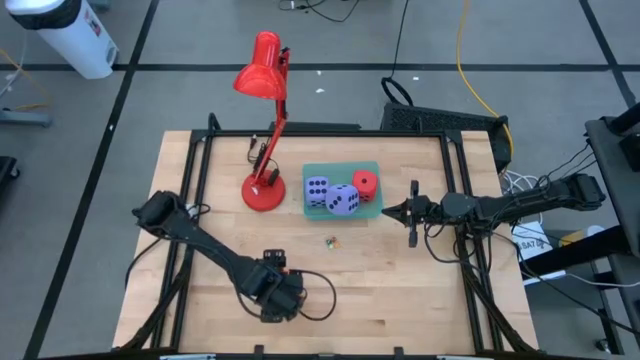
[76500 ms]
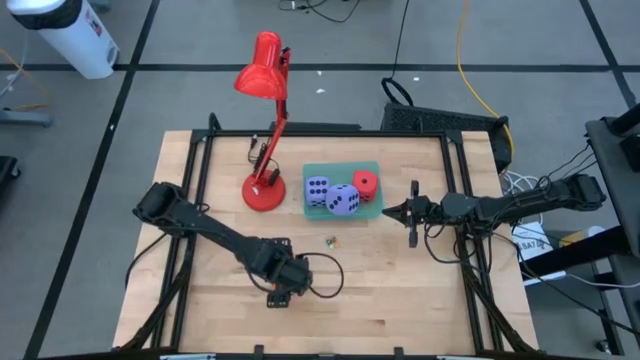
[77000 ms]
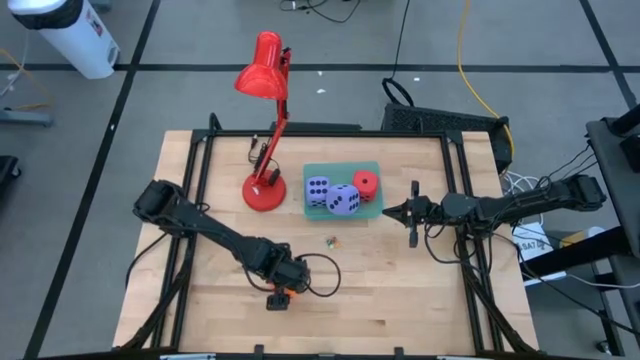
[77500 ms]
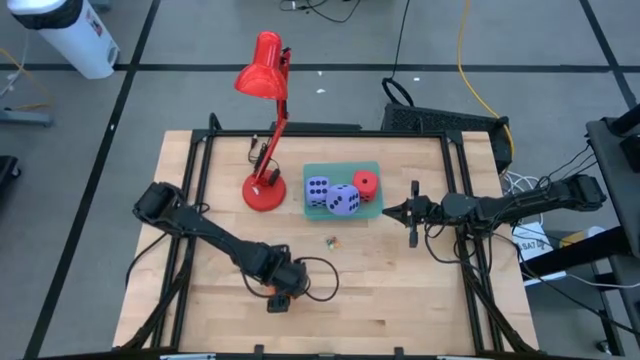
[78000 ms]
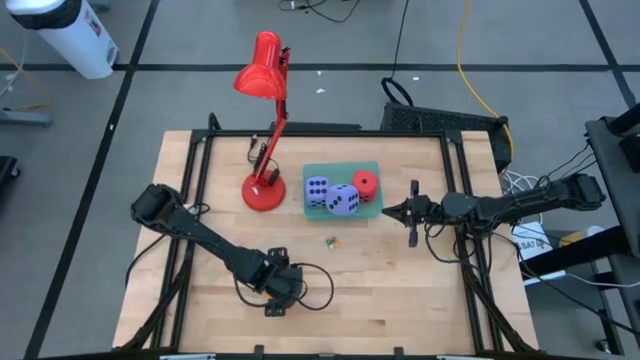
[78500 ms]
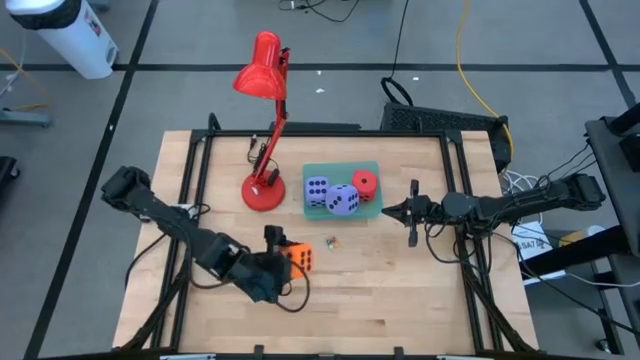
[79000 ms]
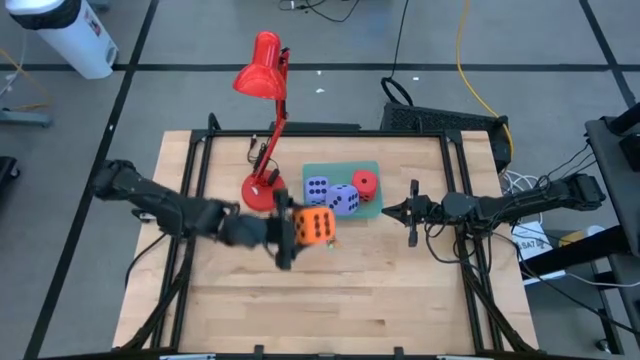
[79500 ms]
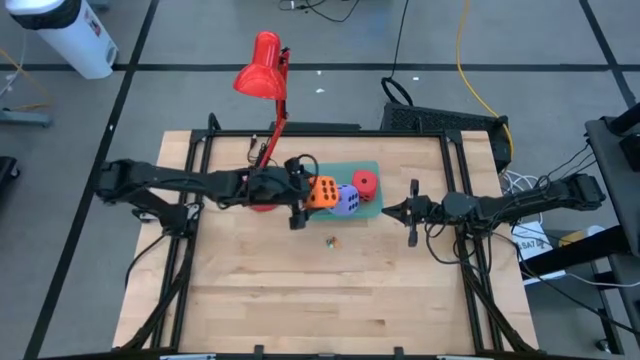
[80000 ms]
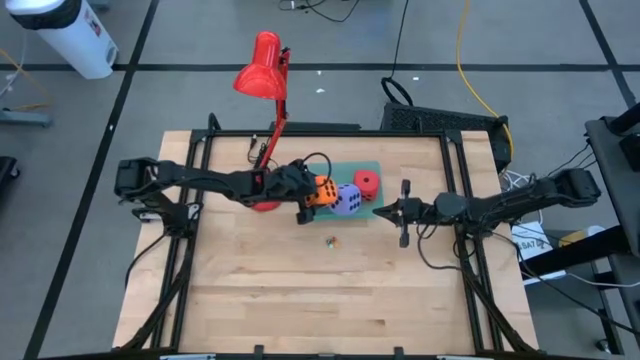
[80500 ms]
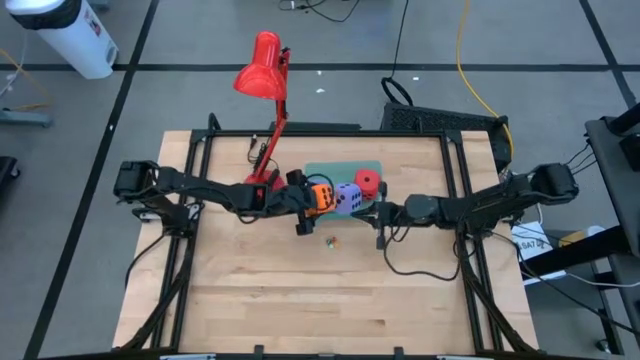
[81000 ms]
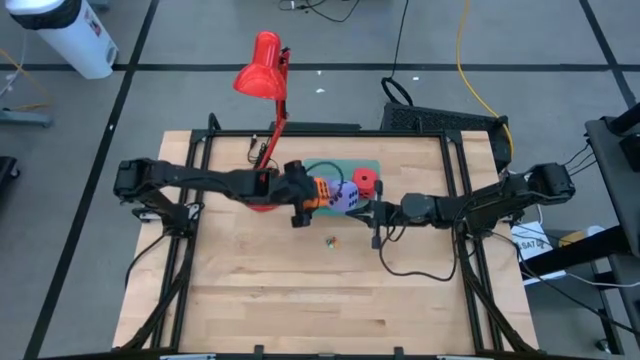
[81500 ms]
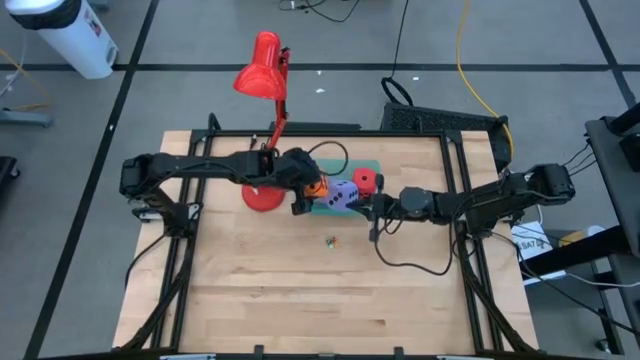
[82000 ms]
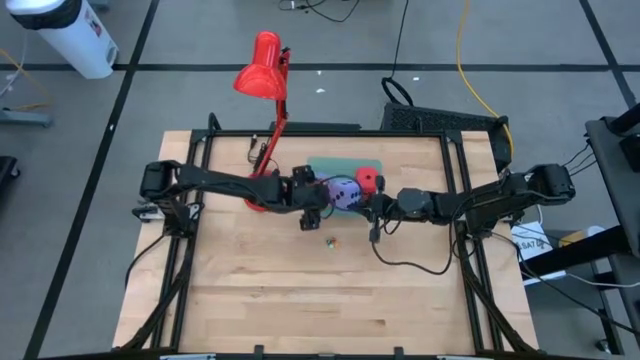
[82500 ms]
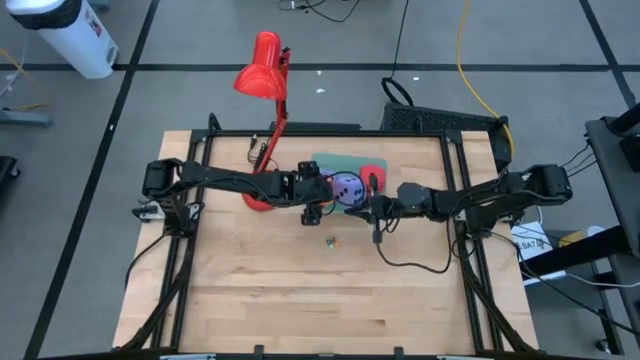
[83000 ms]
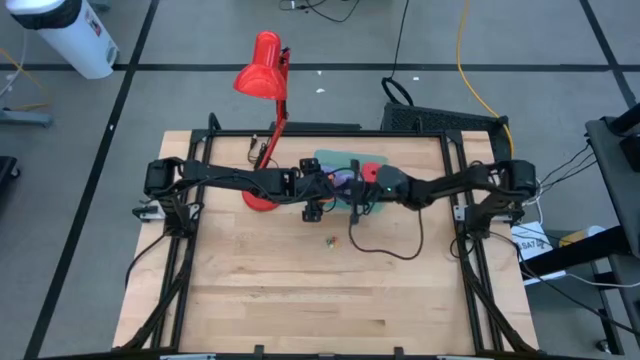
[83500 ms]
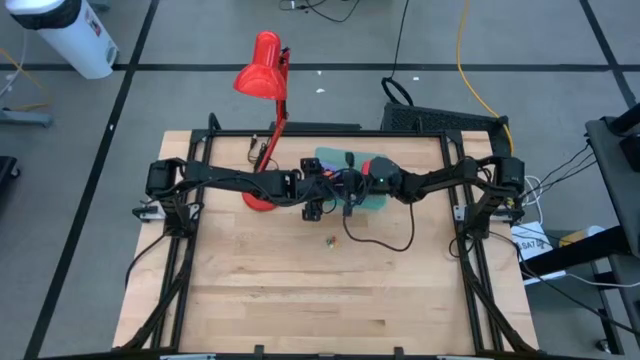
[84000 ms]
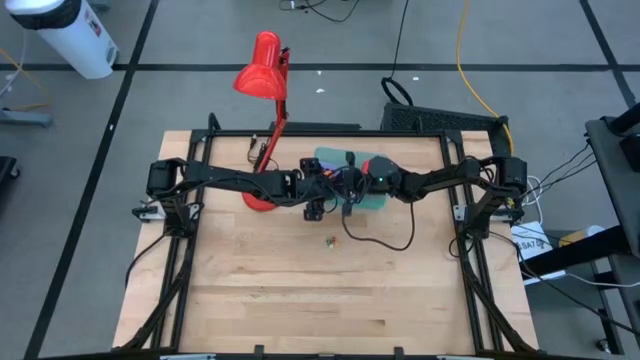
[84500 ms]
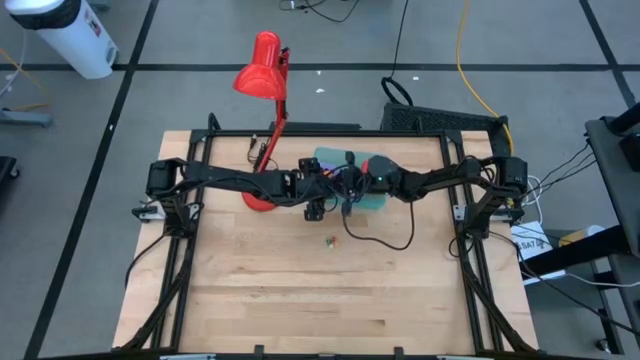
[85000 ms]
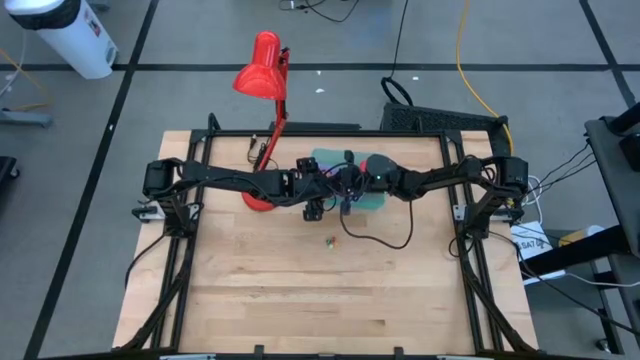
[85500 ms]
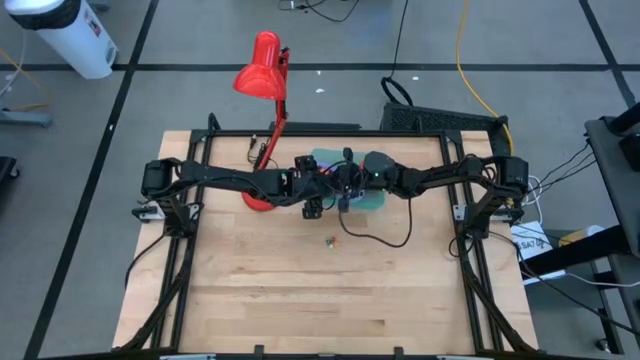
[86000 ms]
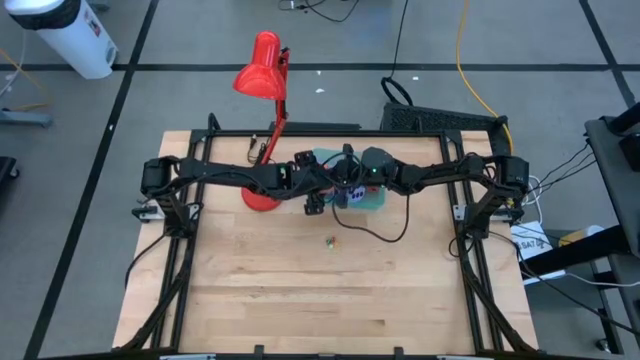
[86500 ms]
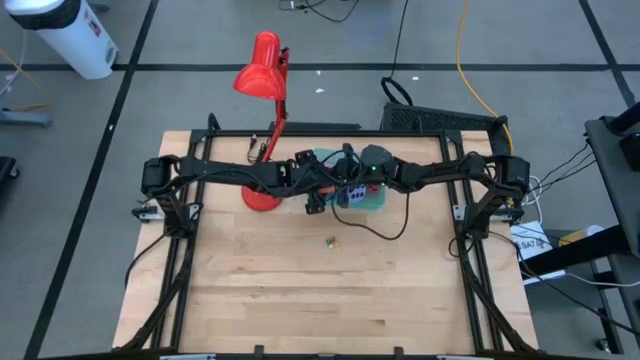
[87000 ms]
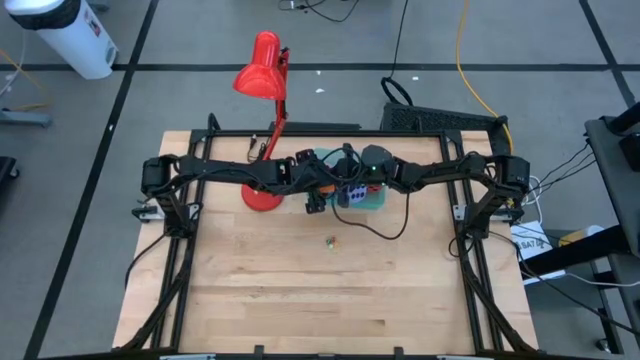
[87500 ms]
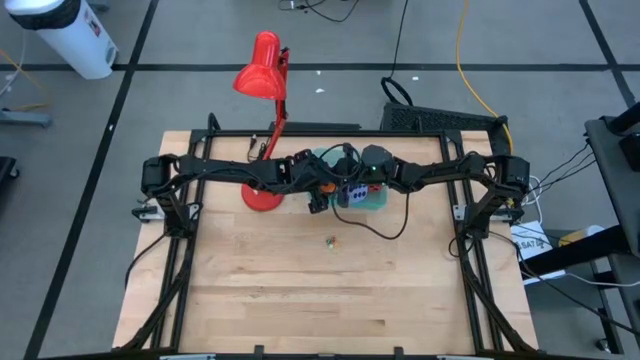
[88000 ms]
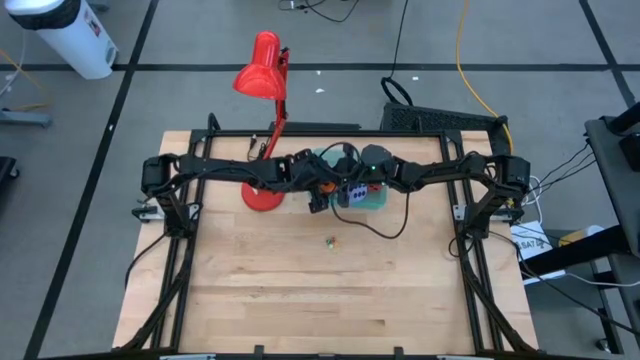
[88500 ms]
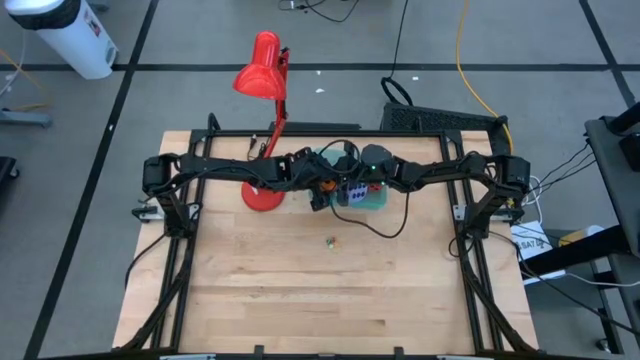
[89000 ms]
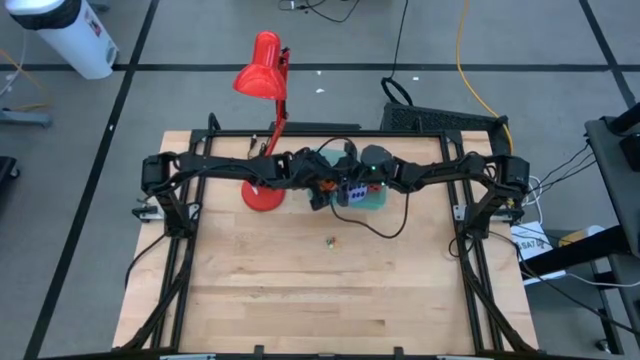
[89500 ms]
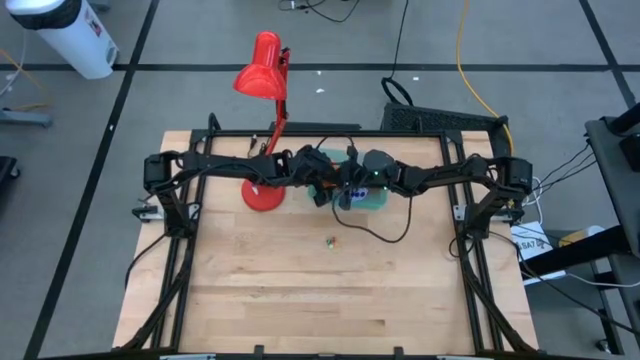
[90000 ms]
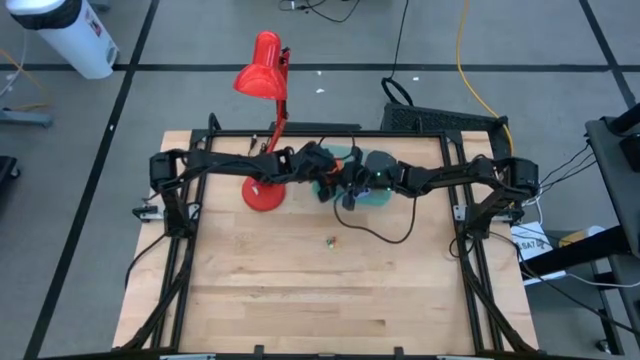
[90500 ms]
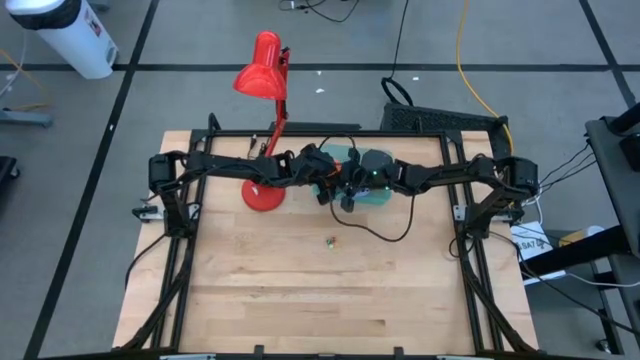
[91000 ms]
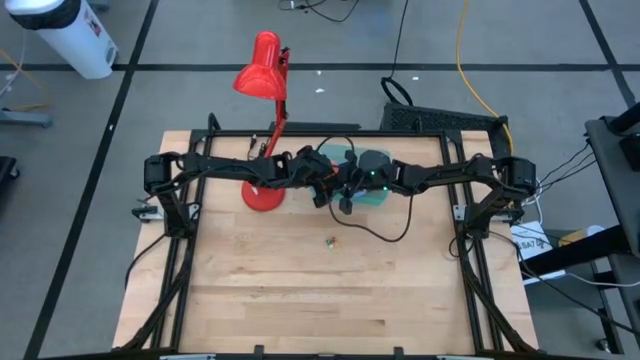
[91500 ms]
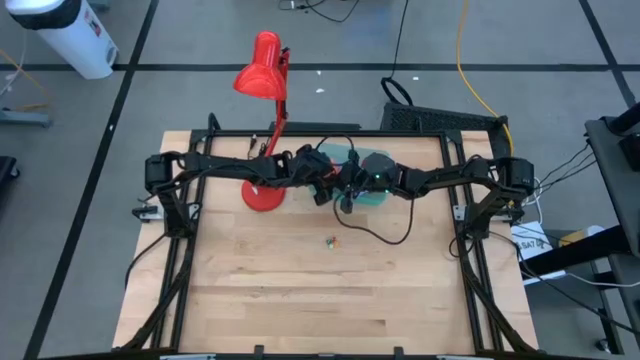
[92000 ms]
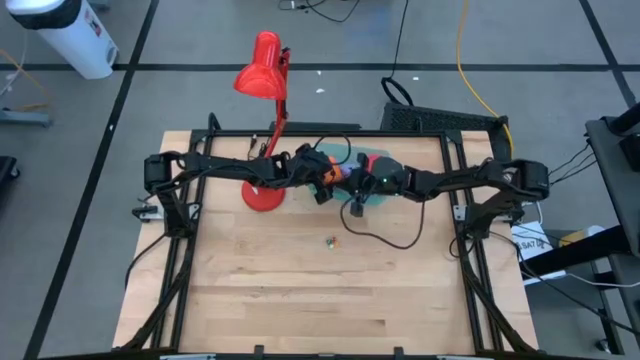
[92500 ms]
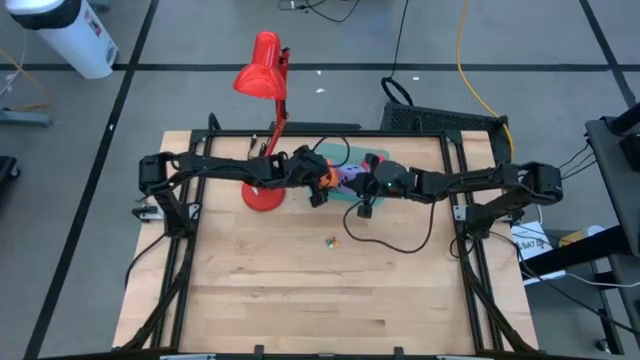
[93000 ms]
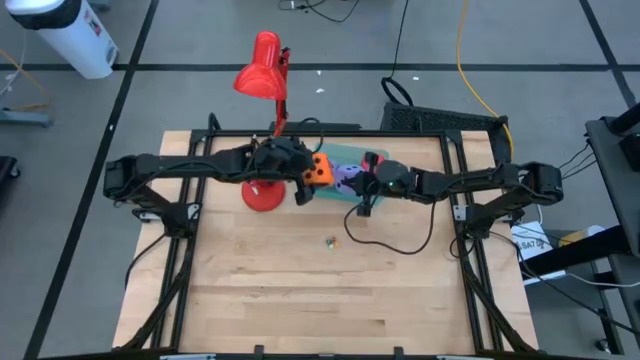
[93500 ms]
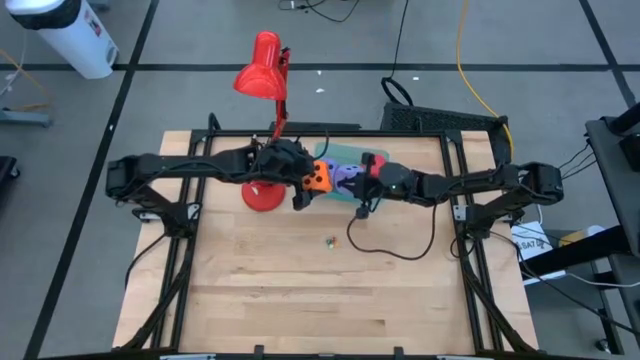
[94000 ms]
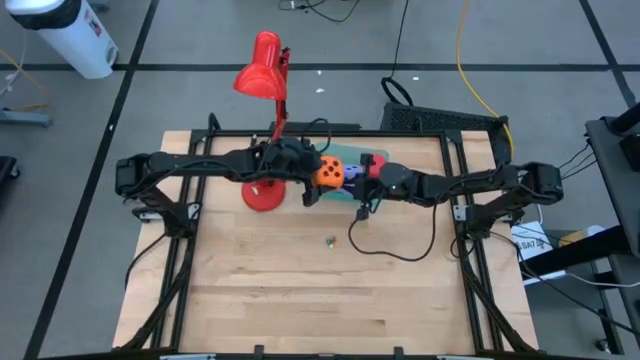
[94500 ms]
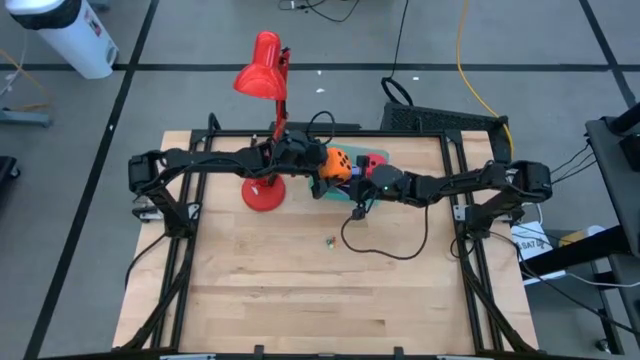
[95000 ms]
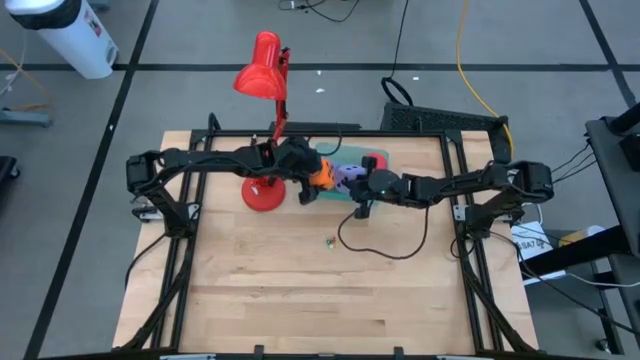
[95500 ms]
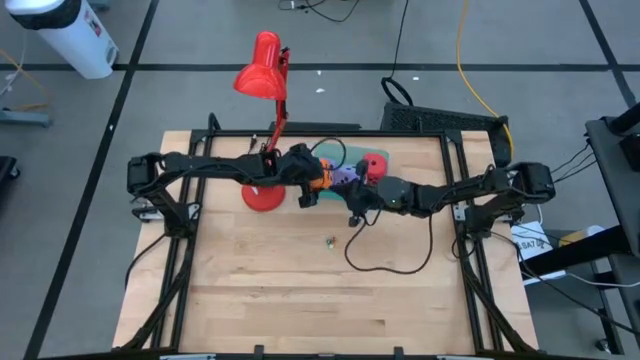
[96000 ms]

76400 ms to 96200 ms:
Task: Pick & Place Dice
Put the large orange die into the blue bin

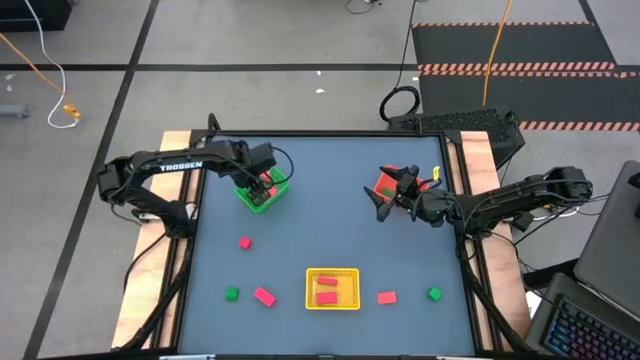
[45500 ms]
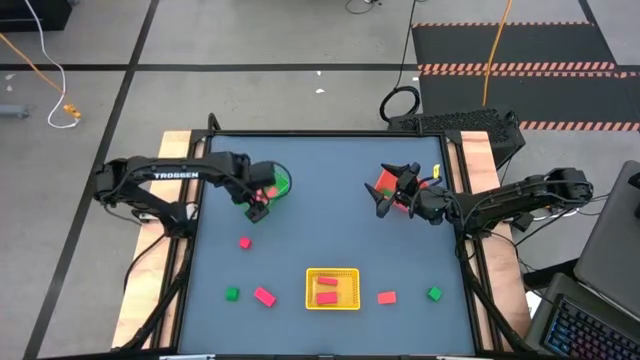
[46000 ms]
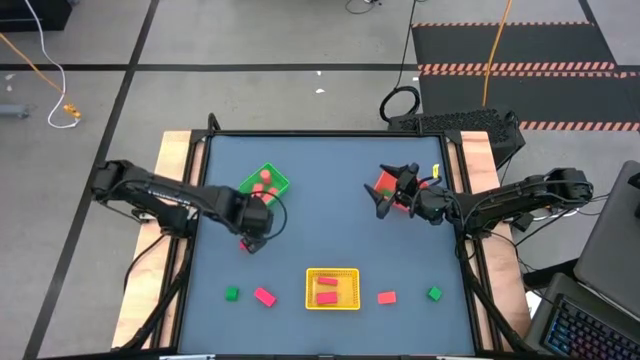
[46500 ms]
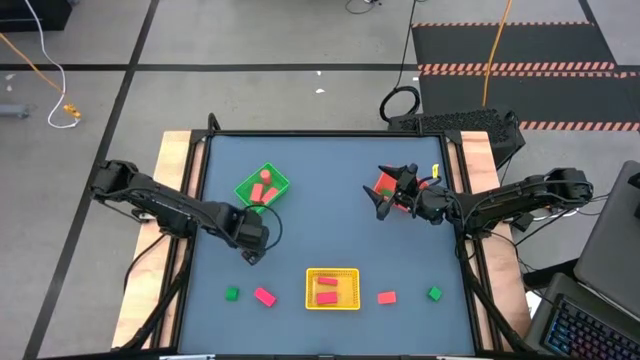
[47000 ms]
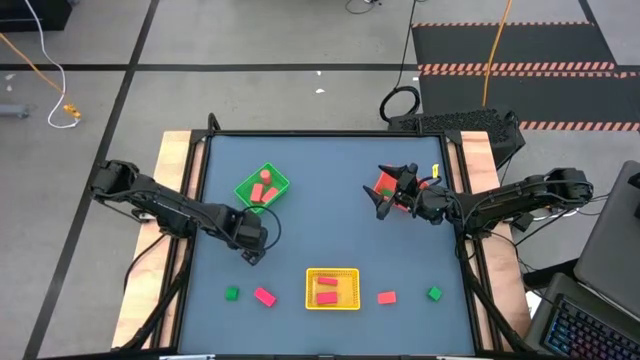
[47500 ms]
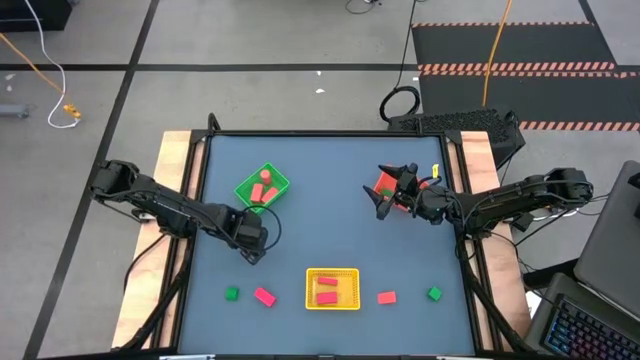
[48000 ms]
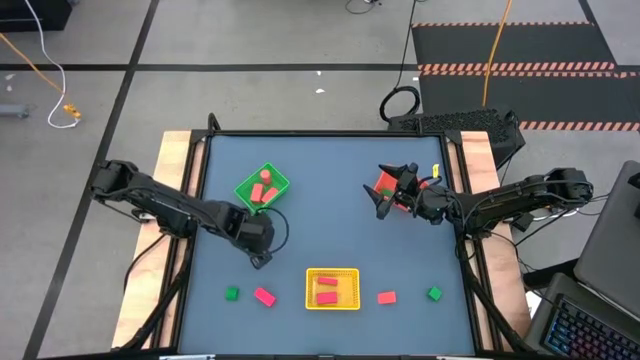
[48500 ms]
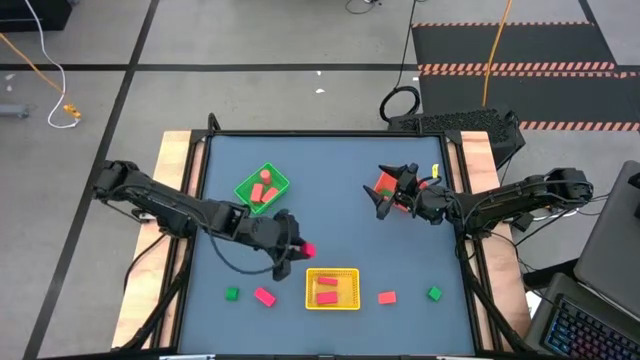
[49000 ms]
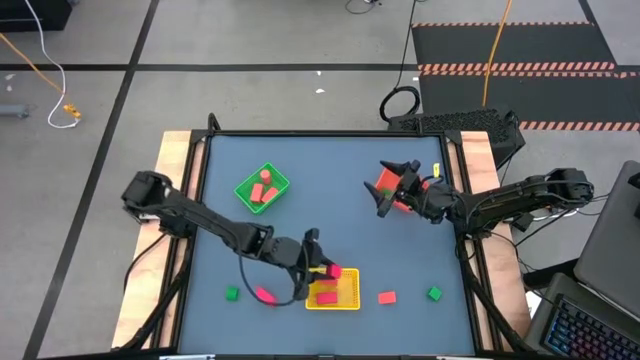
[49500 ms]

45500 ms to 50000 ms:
Task: Sort & place blocks by color
Put the red block into the green bin
